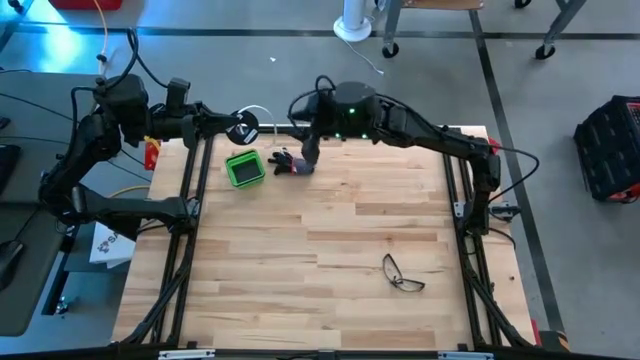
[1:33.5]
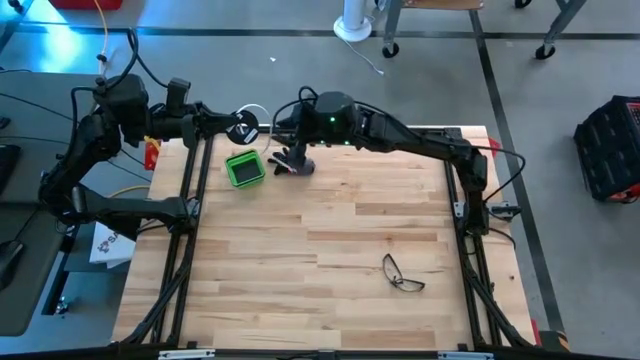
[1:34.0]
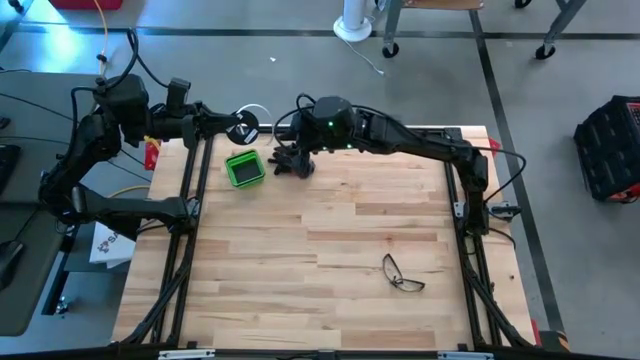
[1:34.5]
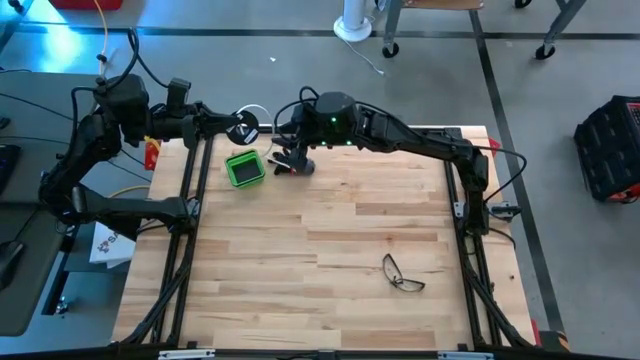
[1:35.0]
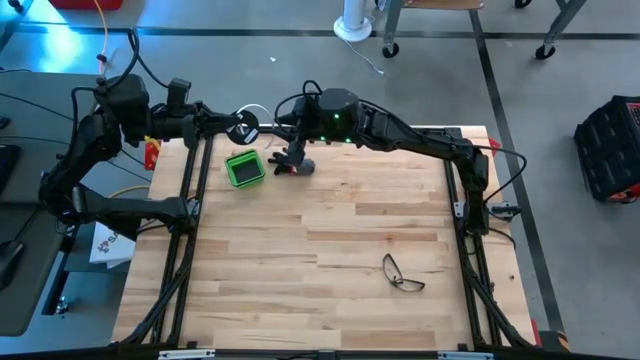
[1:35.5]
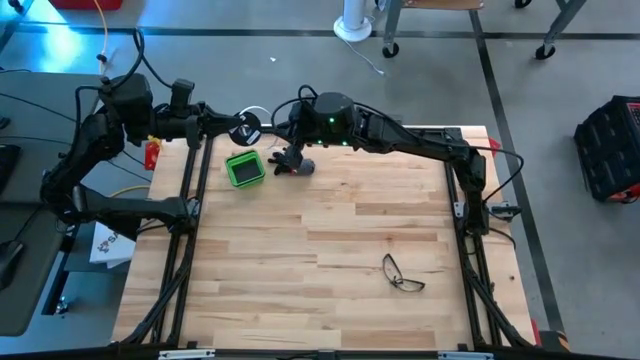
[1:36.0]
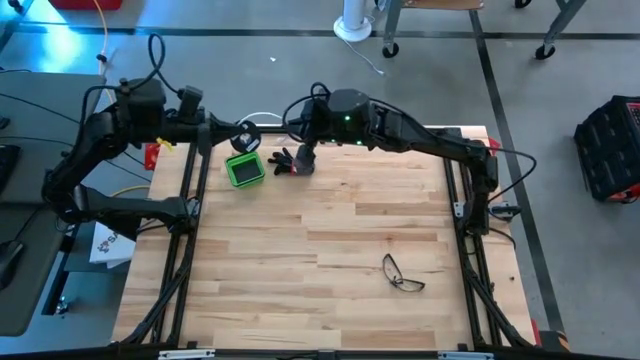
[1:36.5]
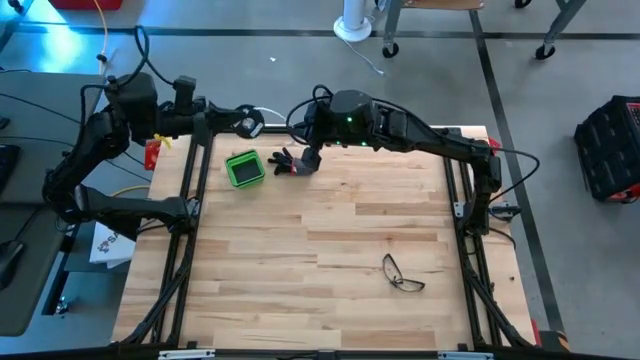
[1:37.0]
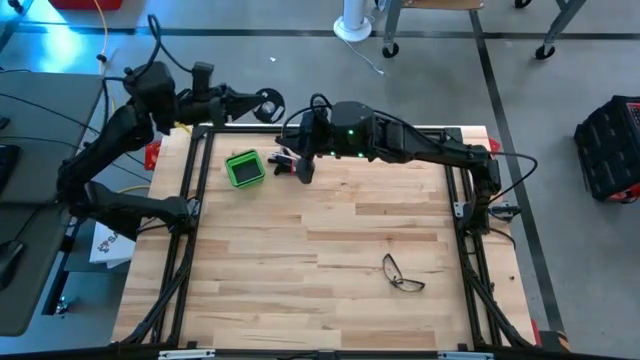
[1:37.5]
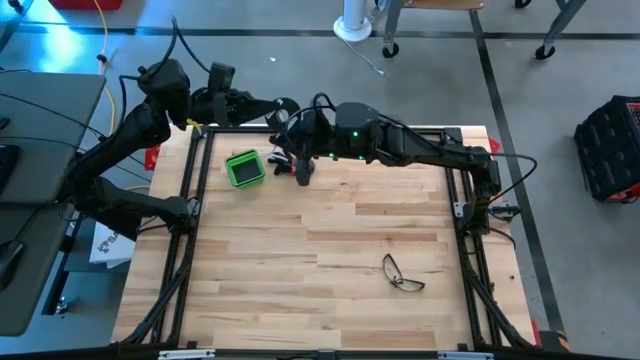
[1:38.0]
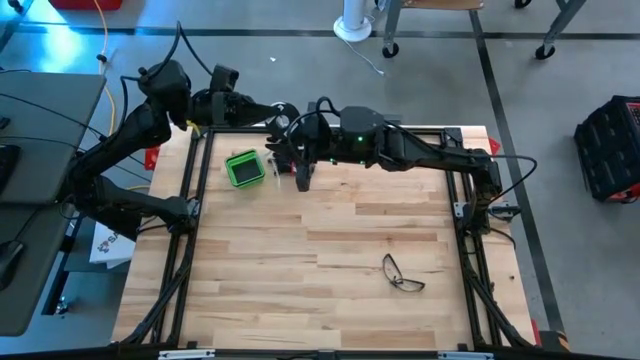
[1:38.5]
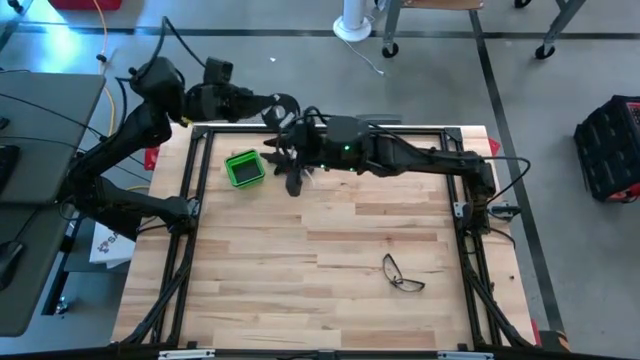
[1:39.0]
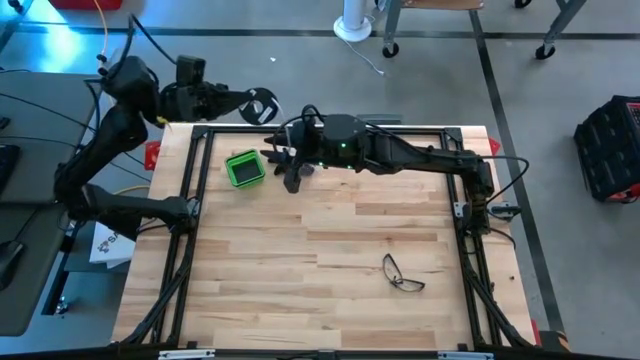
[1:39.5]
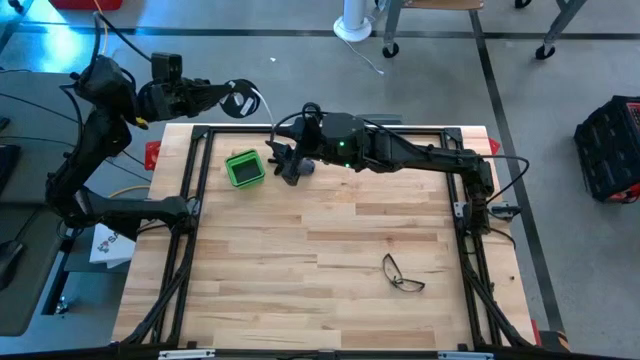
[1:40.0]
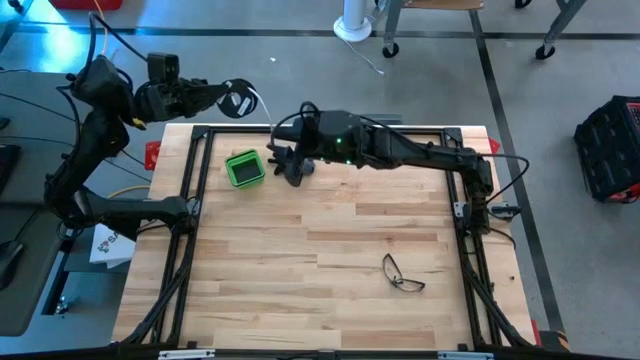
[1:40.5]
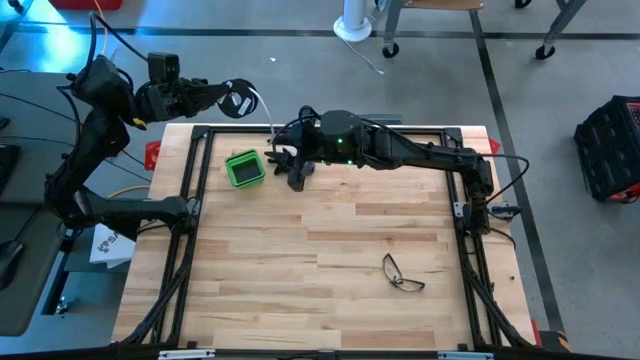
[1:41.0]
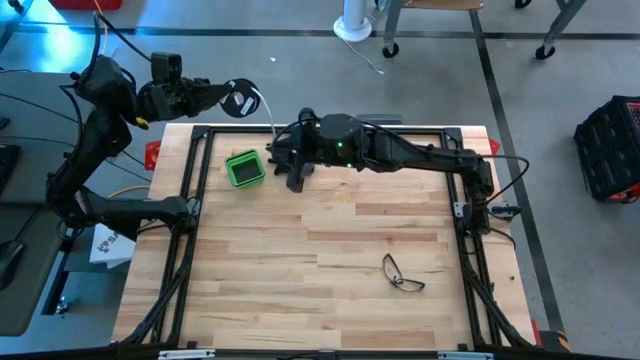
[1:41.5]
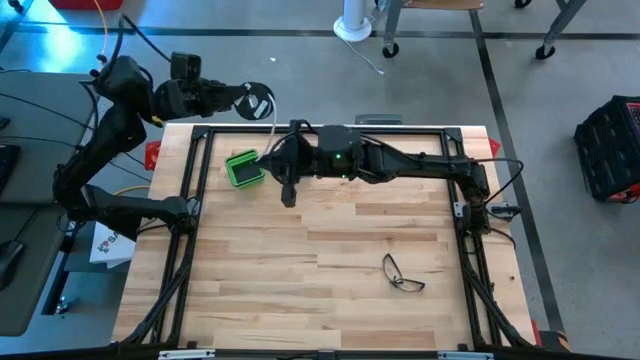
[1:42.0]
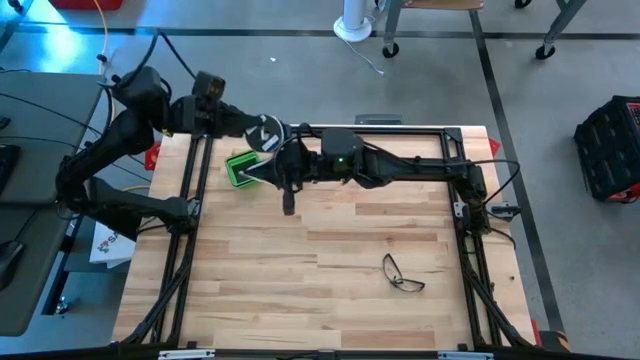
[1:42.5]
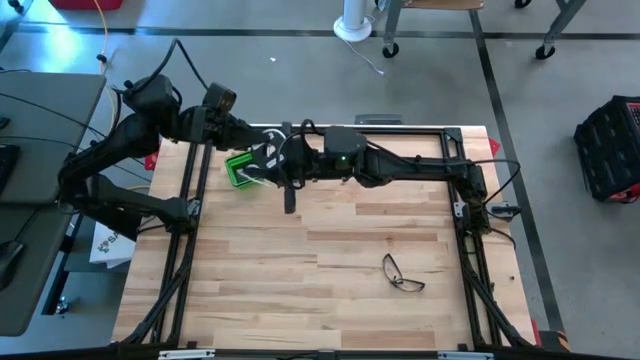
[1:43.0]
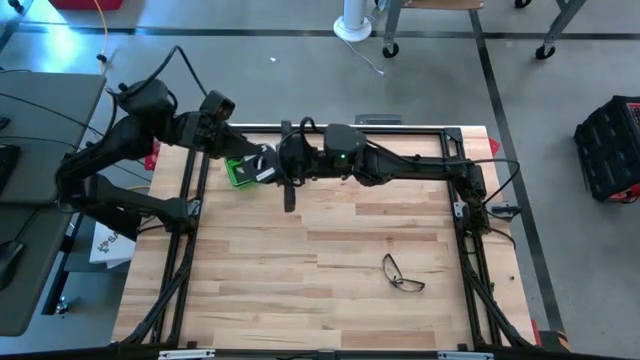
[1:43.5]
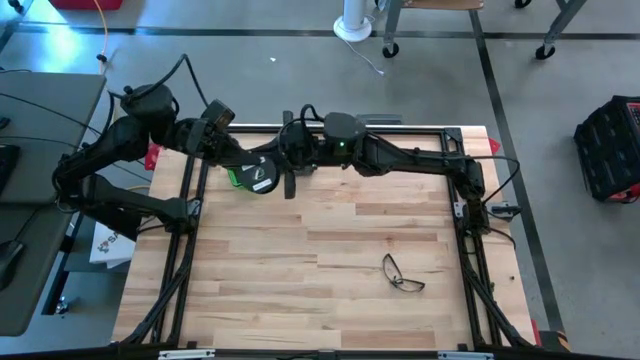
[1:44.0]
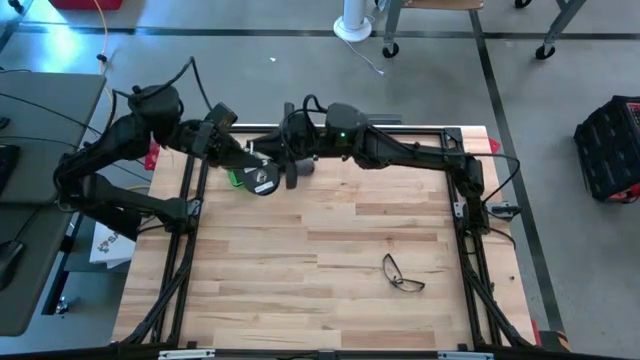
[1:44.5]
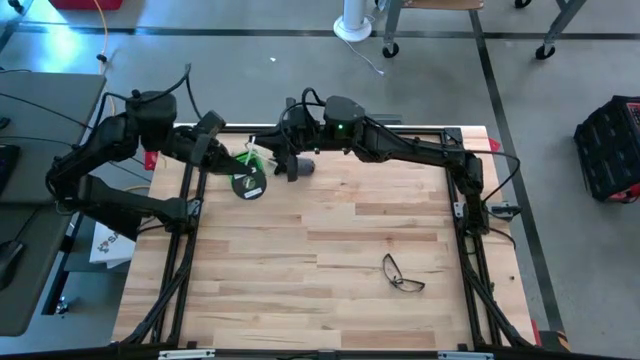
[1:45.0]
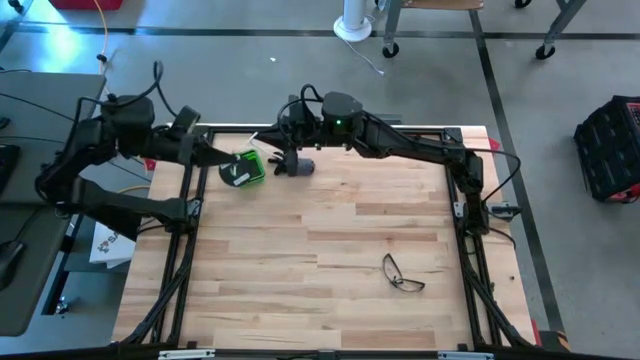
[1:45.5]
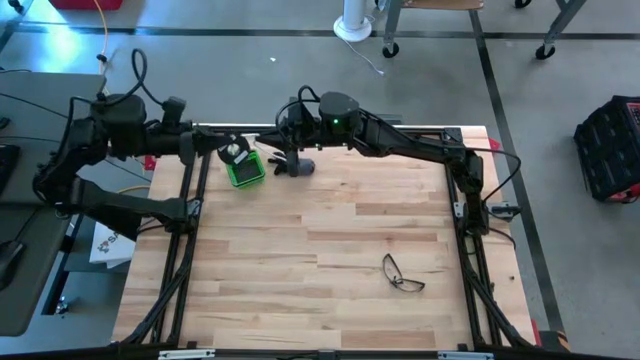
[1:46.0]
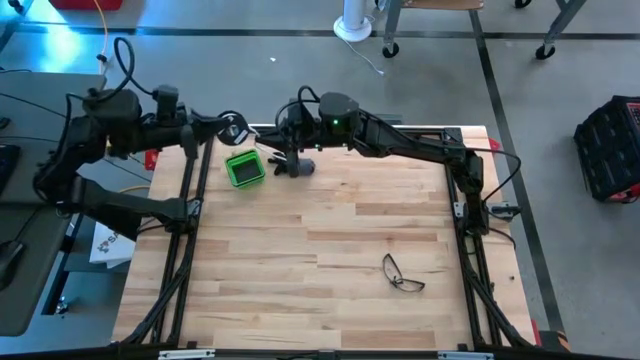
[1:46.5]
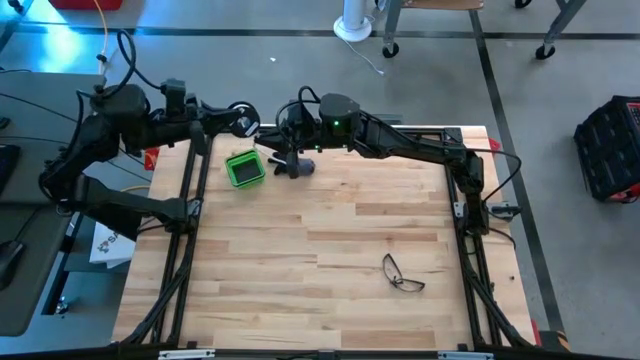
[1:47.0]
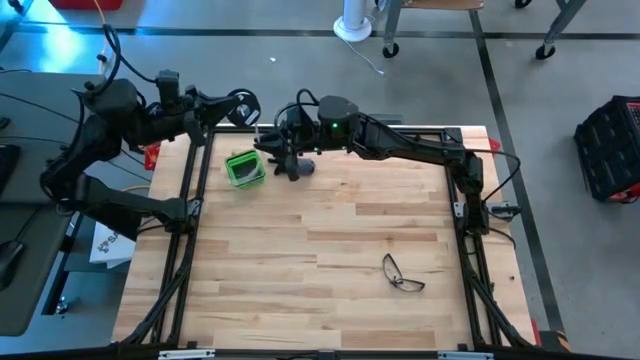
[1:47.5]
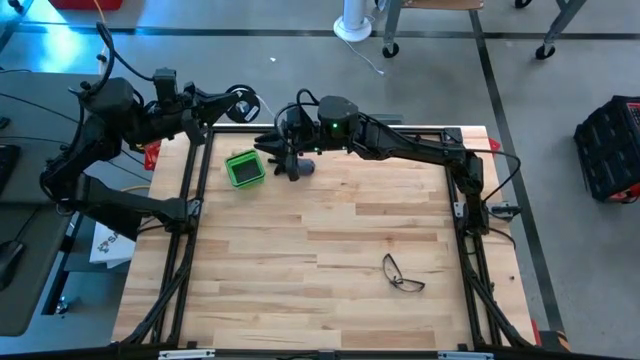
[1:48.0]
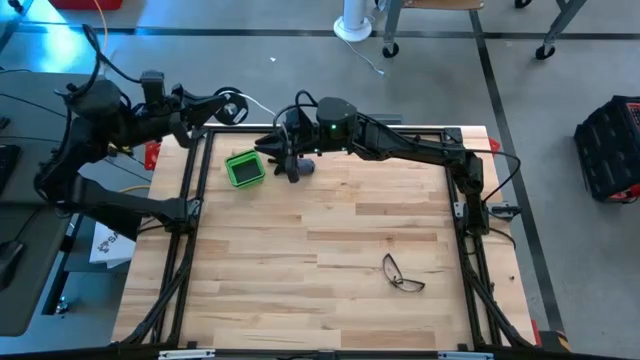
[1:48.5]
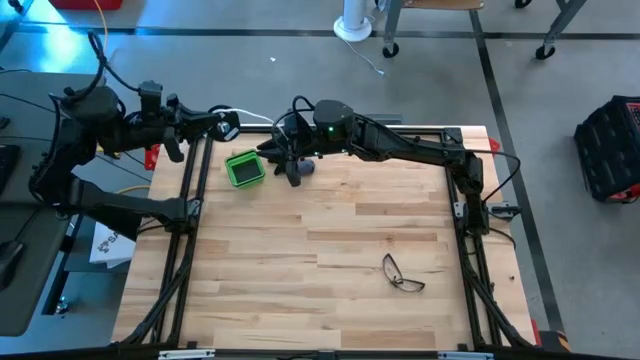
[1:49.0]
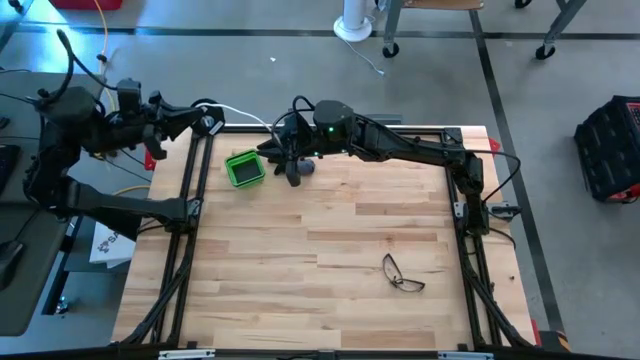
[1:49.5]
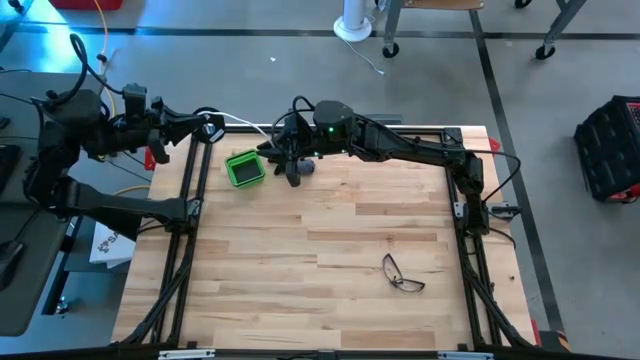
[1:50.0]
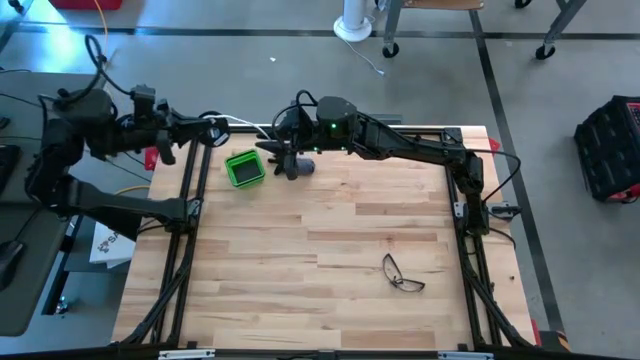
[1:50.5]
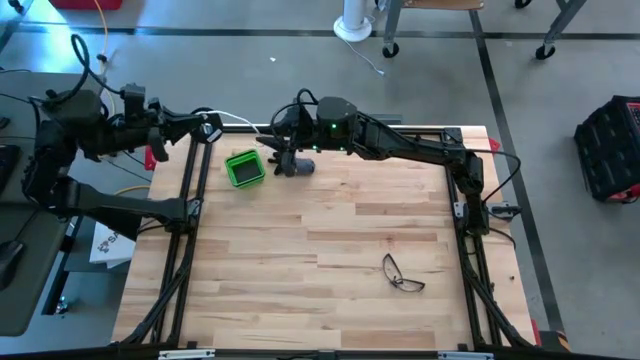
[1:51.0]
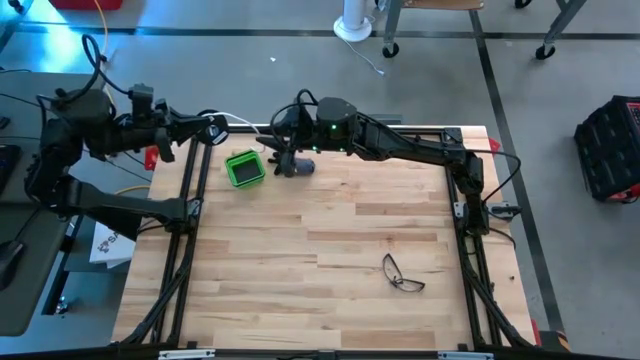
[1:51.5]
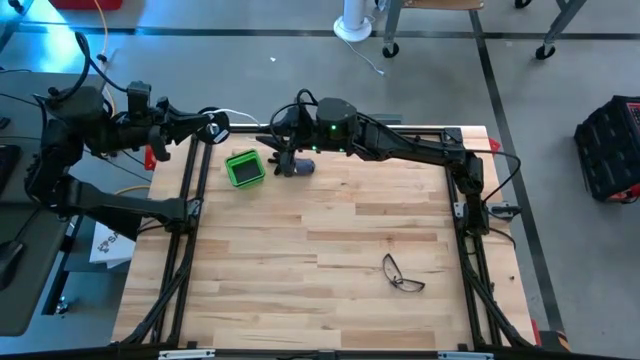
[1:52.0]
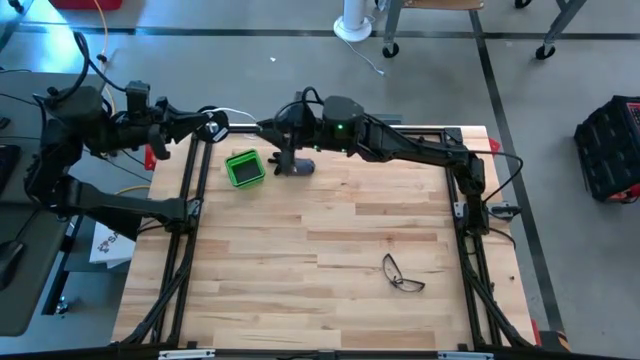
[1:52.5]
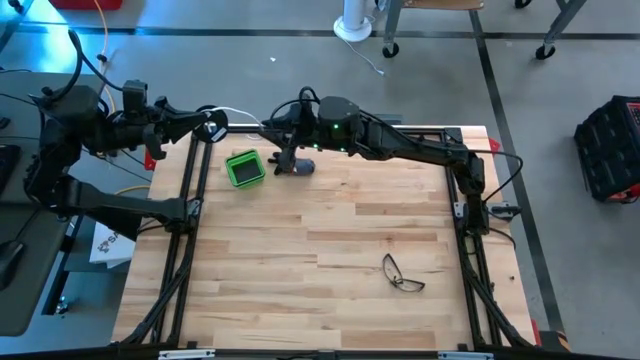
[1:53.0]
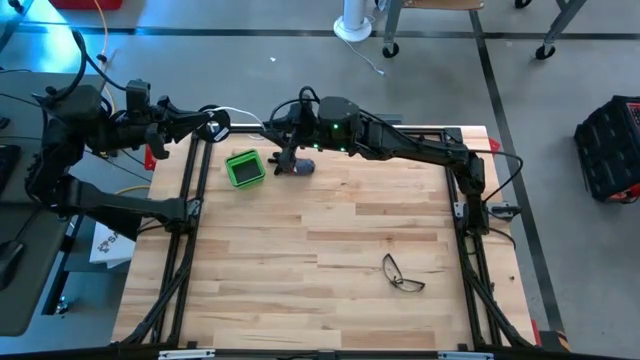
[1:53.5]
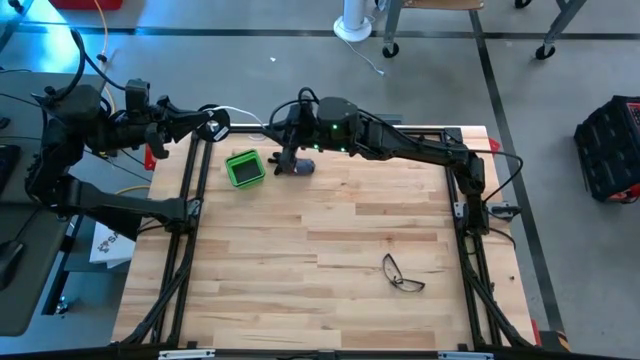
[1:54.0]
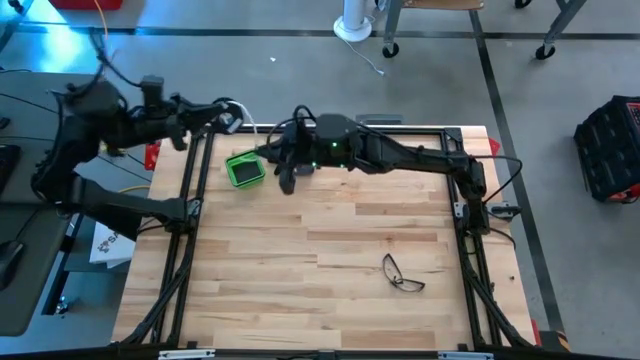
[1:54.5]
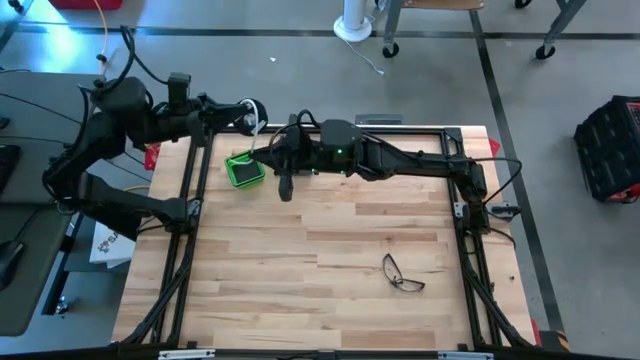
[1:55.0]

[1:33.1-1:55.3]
Task: Coil cords
Coil the white wire on the spool
